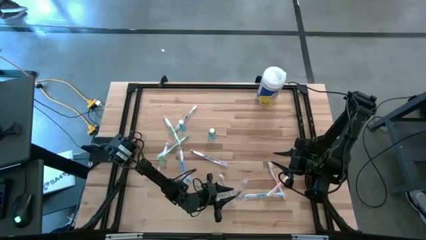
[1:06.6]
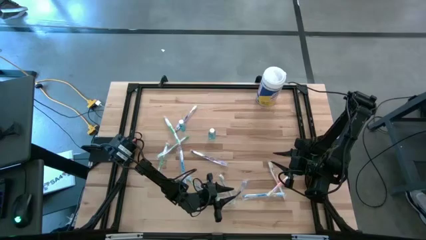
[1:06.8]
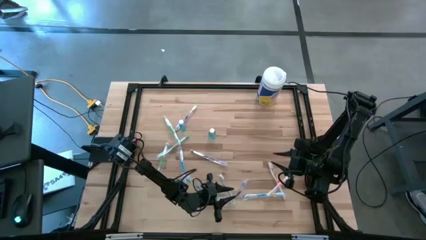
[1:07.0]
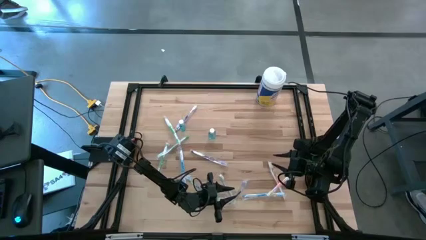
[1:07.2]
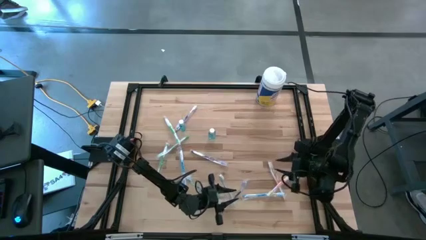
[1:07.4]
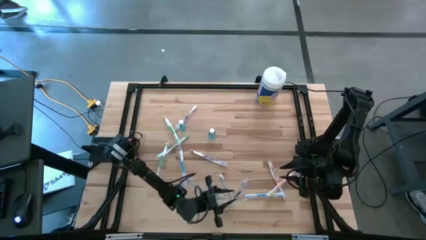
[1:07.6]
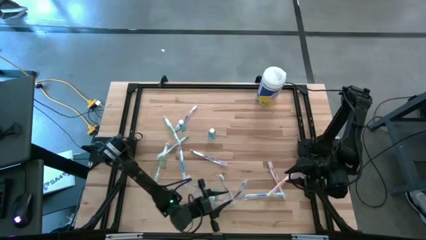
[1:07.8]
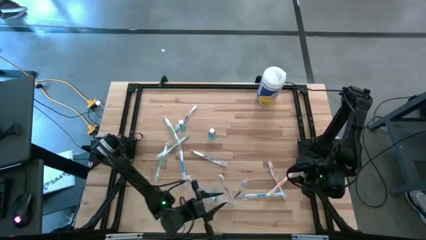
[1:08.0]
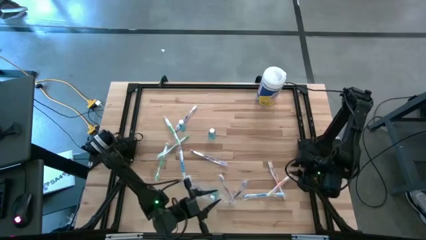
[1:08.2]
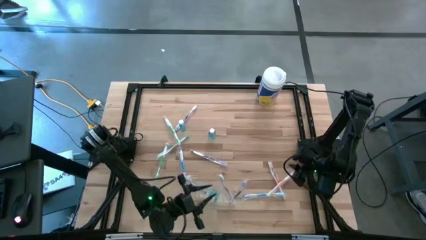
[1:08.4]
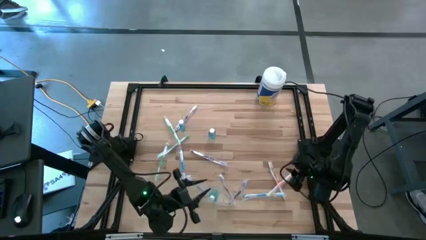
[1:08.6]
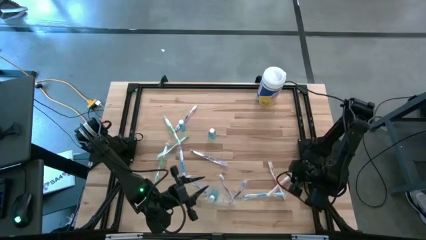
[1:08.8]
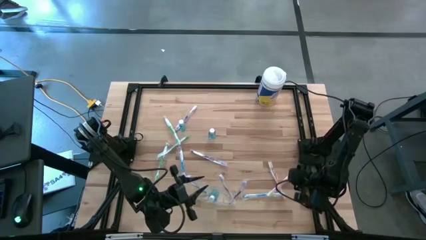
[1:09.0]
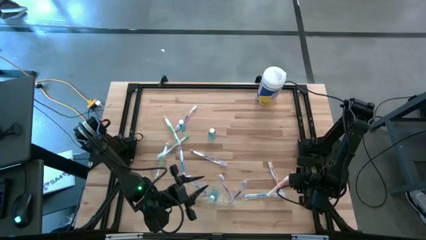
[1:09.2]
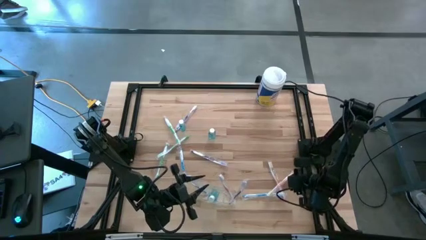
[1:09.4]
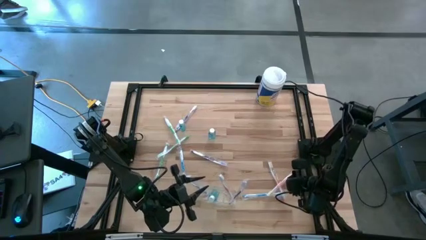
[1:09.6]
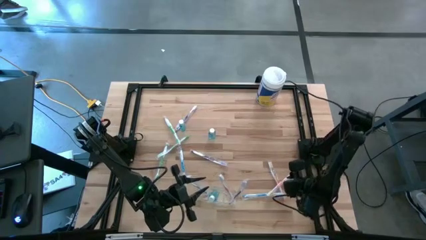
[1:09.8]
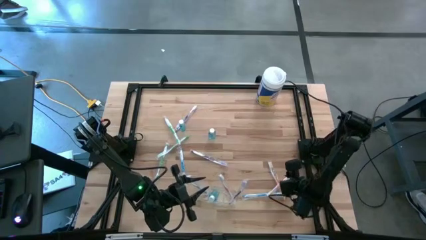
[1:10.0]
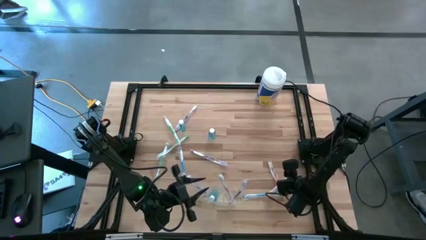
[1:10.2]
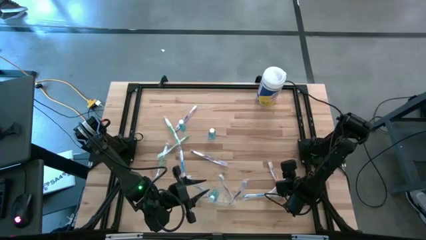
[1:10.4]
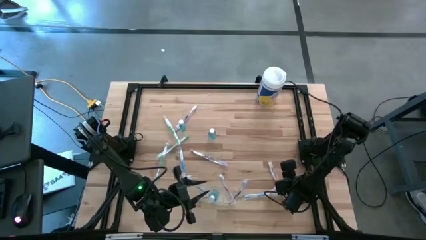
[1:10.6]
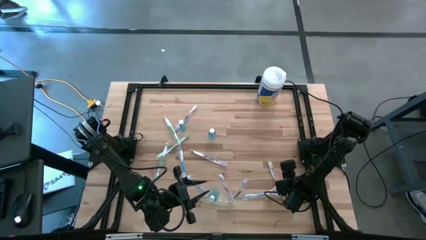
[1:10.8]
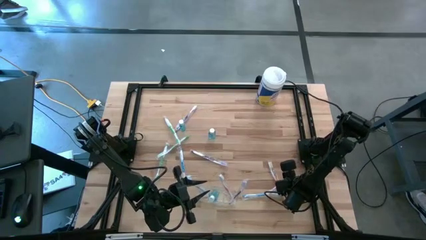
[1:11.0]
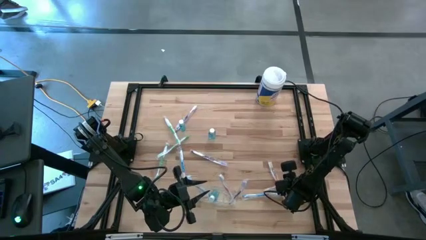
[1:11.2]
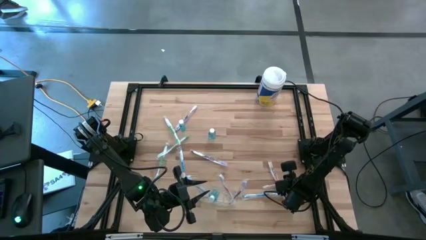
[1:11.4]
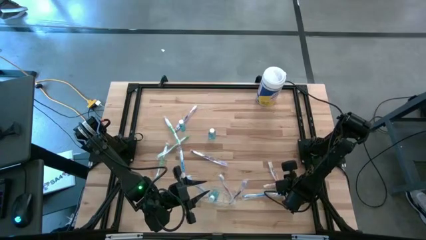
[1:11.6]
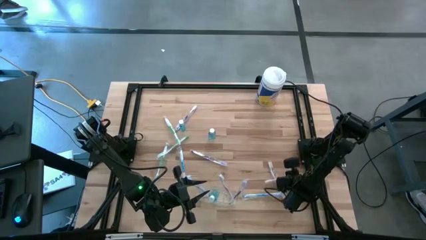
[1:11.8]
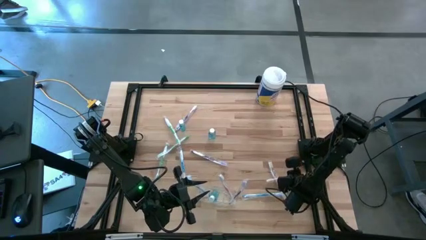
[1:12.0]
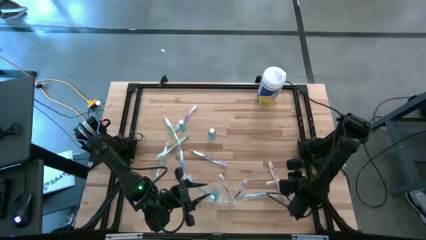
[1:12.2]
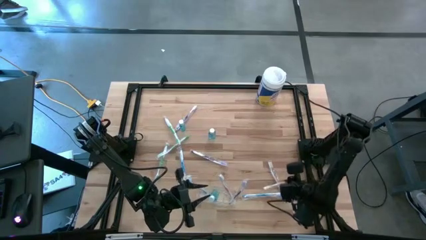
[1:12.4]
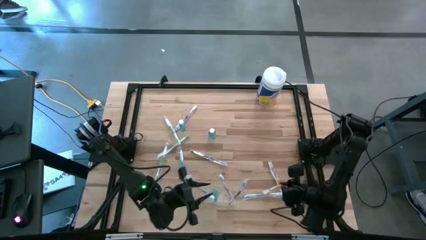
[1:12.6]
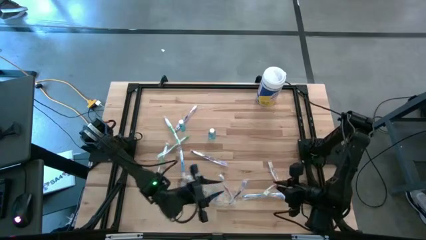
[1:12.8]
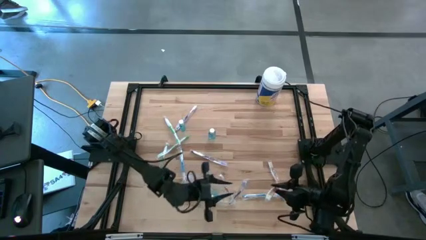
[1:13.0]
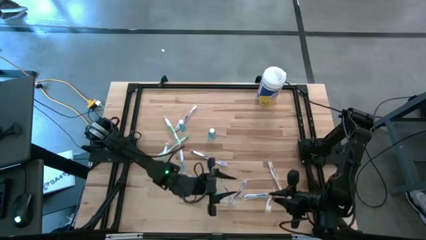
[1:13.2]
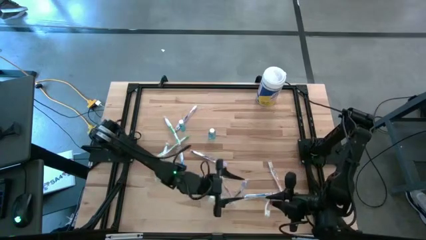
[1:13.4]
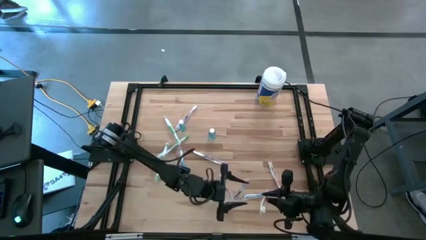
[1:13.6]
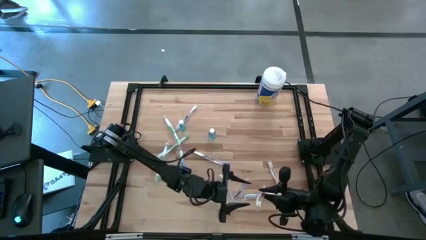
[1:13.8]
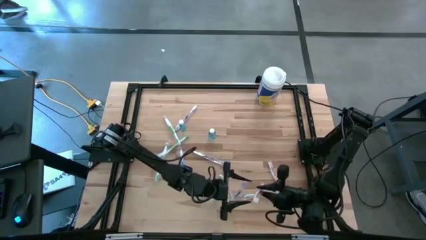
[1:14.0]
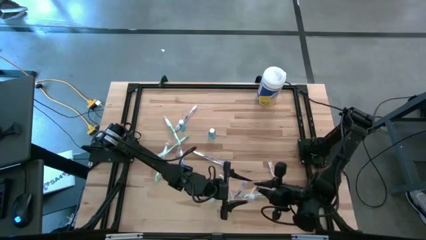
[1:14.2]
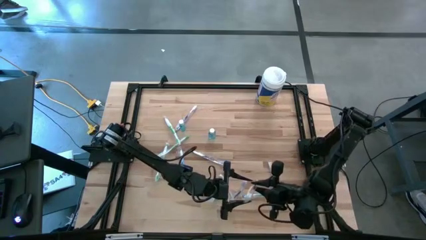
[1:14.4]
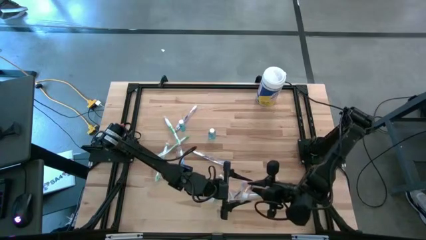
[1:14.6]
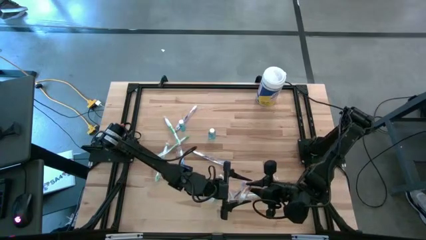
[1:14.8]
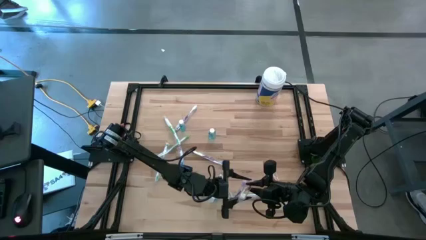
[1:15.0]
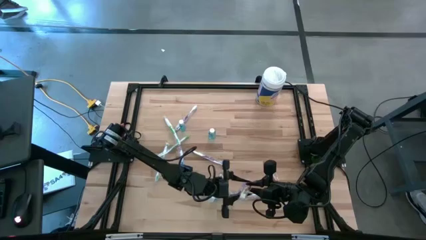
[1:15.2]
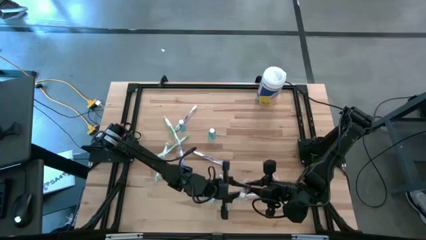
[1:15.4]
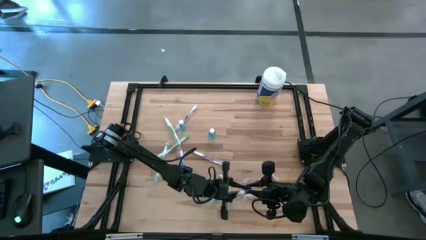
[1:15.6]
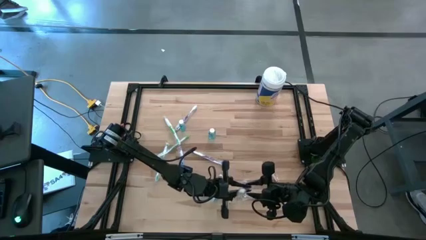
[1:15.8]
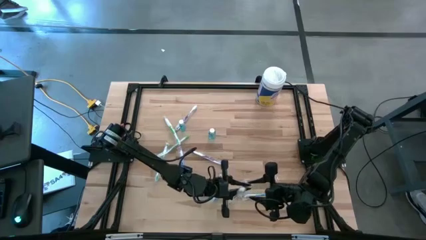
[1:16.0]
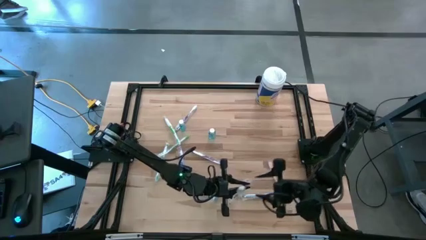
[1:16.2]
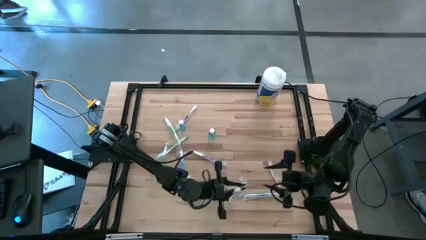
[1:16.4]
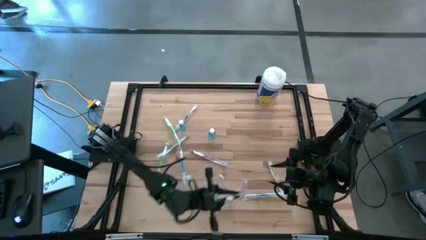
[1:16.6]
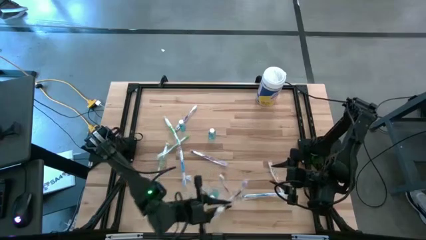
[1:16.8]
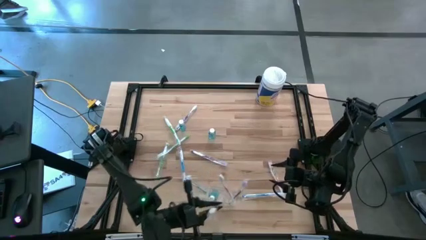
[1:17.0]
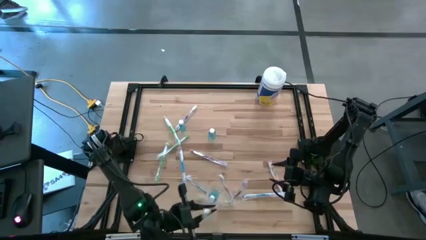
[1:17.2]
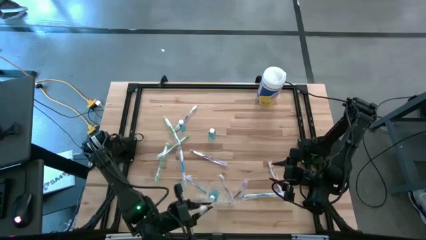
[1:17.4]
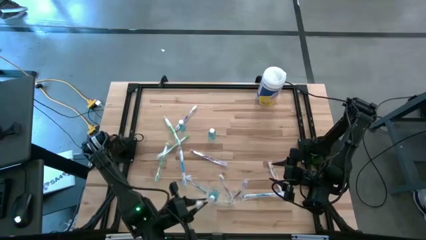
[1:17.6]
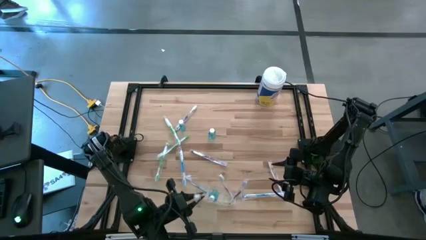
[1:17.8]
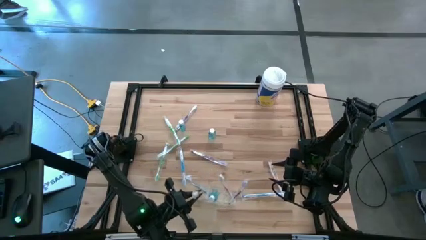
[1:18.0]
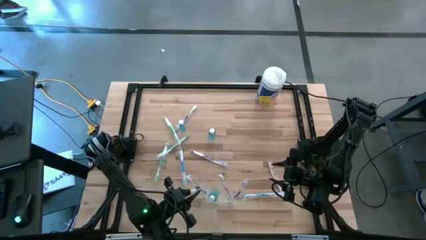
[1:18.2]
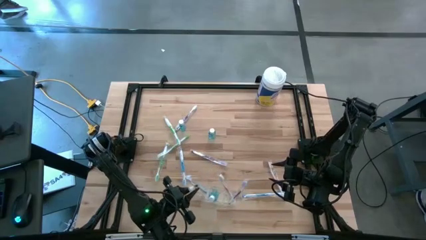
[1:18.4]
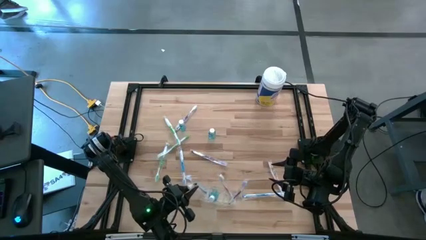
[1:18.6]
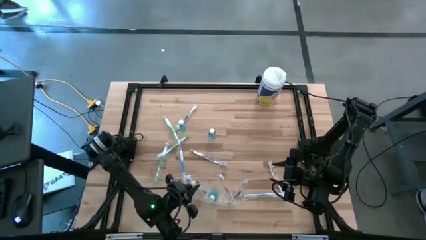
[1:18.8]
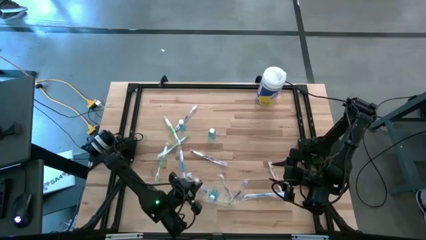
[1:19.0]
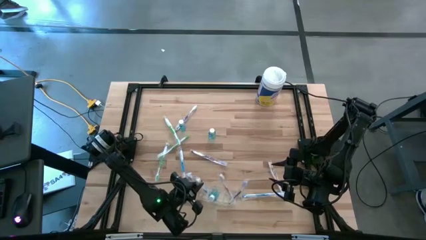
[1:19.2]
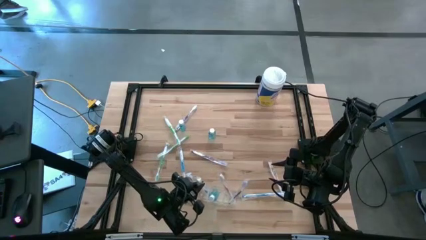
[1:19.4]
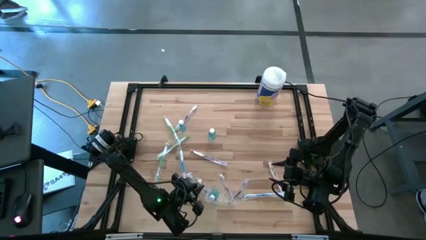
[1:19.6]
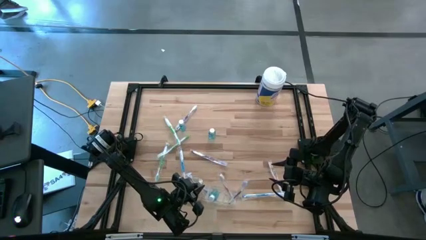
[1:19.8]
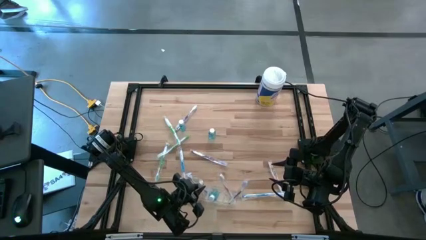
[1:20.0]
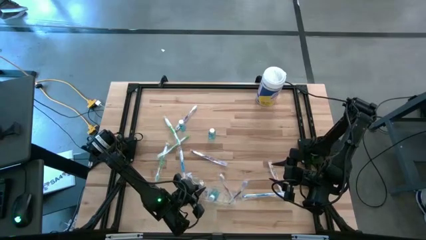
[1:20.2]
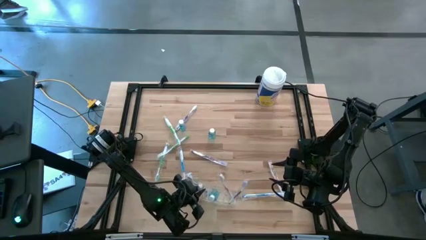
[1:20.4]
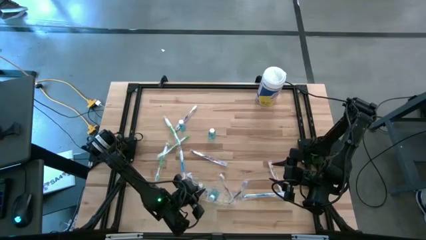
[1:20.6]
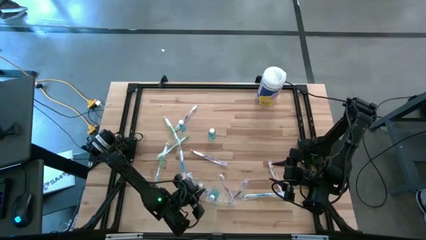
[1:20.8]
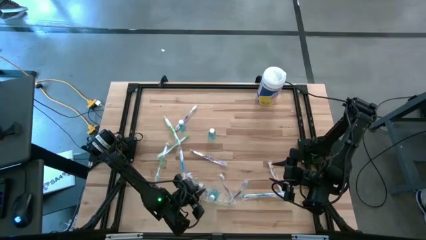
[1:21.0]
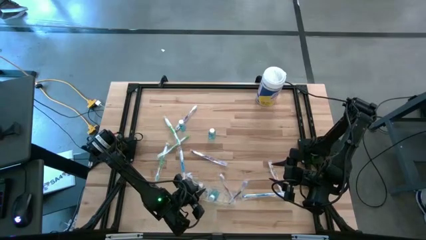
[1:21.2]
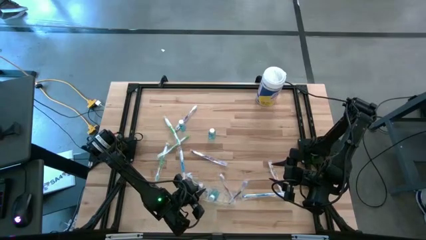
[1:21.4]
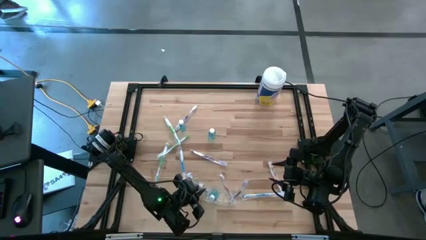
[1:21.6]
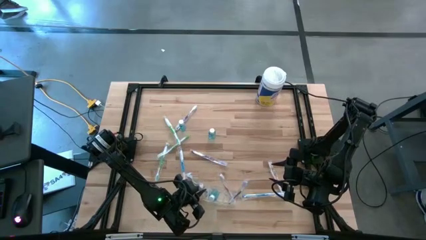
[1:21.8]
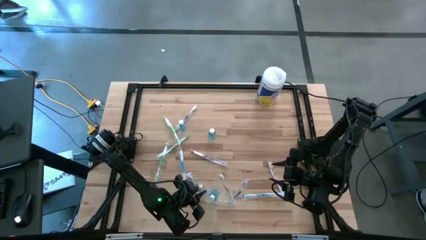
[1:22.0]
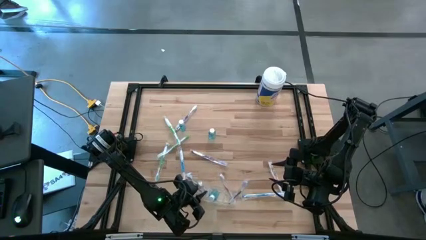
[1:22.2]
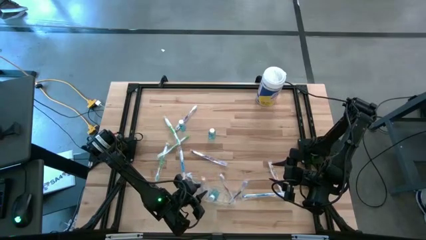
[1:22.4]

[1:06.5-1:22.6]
Task: Pick & Place toothbrushing station
Put the orange toothbrush into the transparent organizer

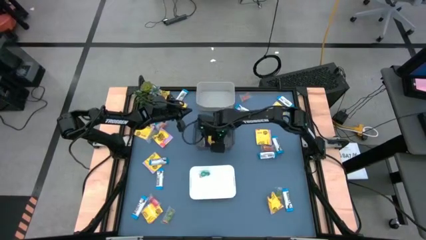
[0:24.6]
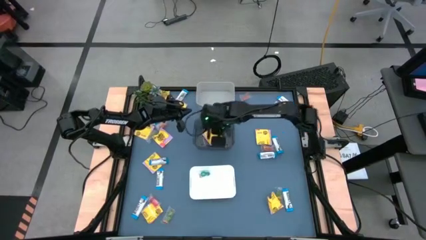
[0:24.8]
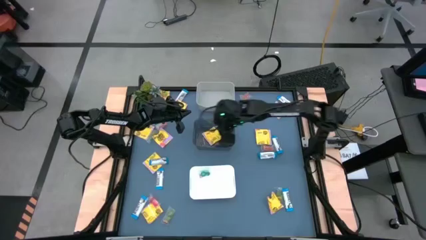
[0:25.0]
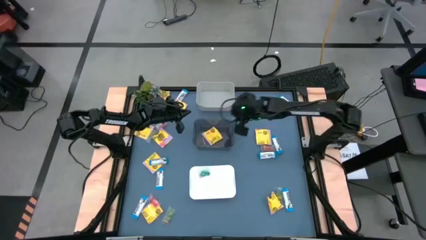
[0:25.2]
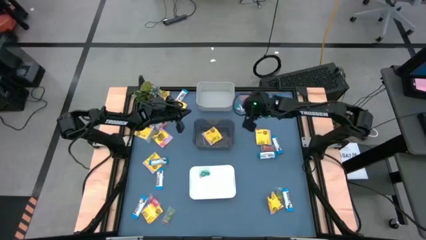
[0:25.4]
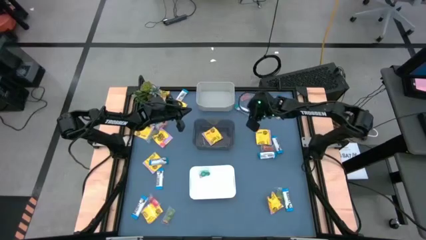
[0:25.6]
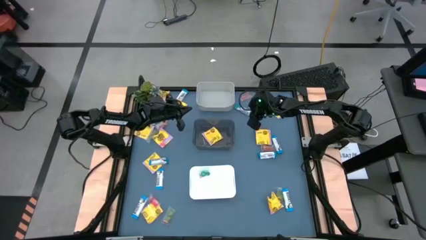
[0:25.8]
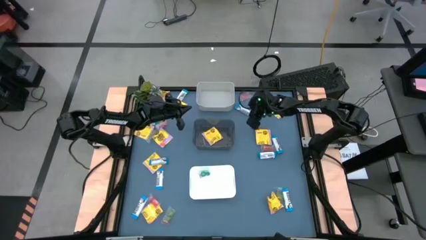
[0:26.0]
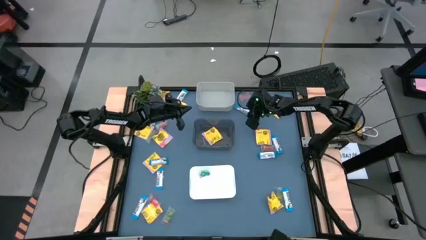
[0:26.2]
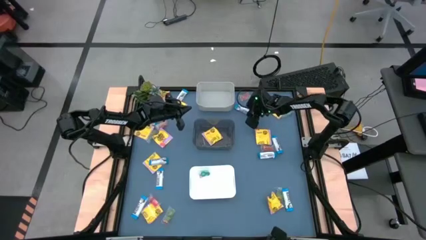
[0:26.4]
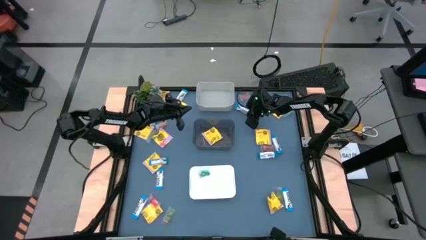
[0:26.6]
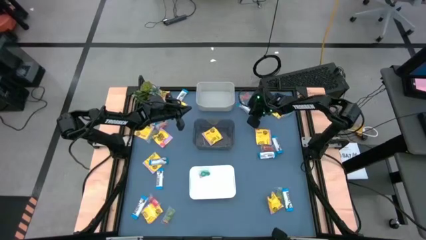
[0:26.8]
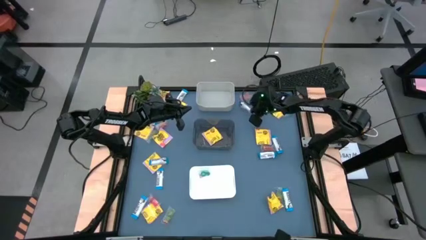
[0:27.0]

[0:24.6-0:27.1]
Task: Sort candy
Put the chocolate bar into the gray bin
